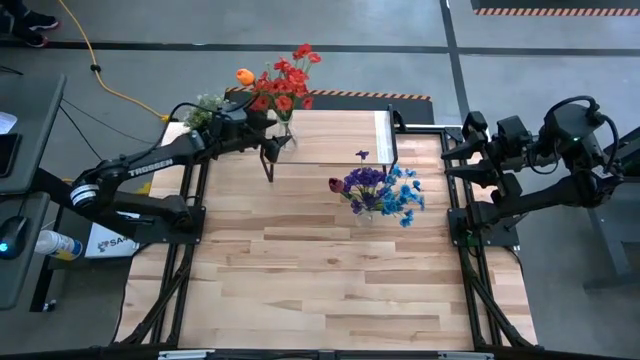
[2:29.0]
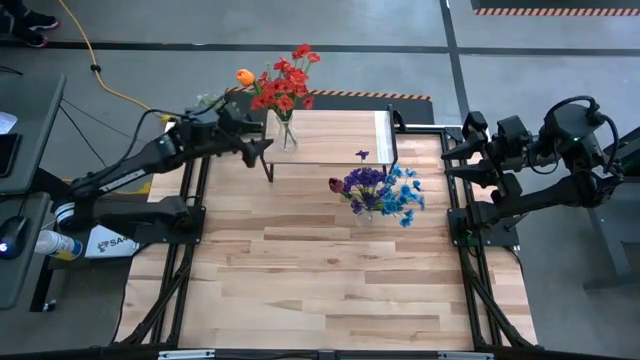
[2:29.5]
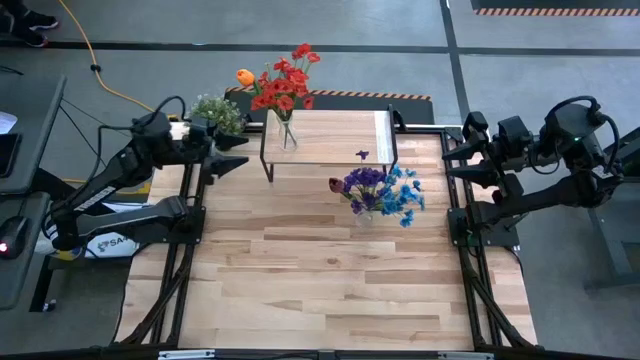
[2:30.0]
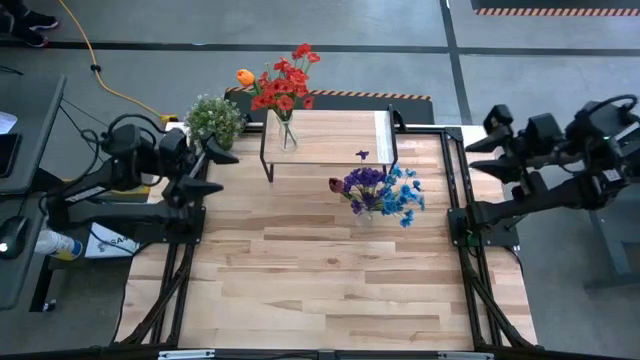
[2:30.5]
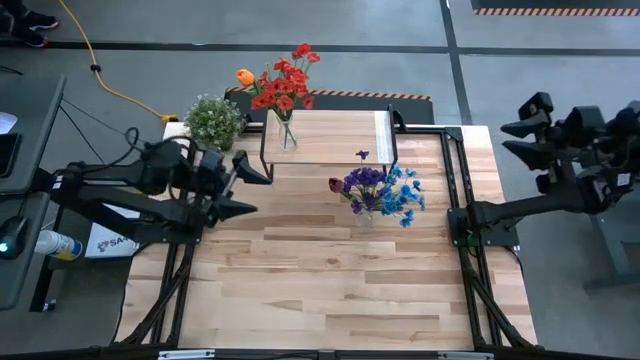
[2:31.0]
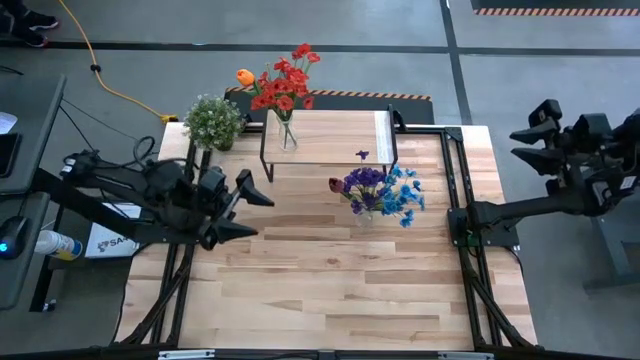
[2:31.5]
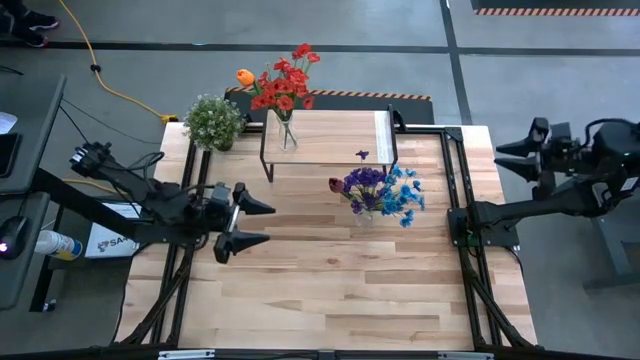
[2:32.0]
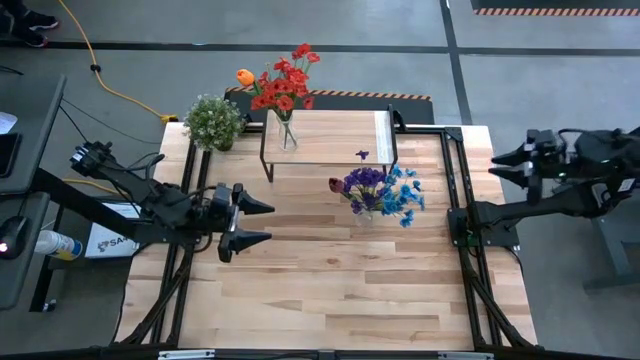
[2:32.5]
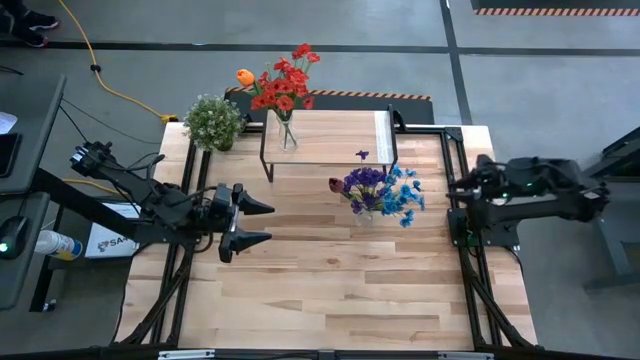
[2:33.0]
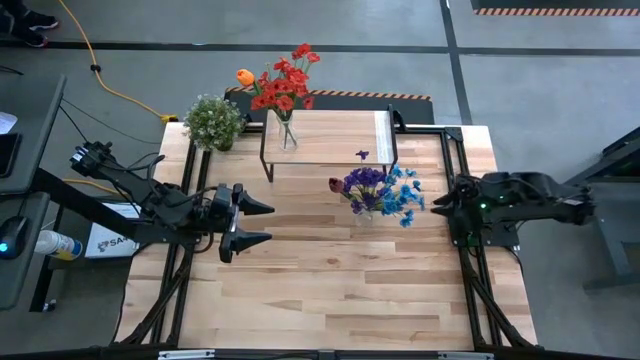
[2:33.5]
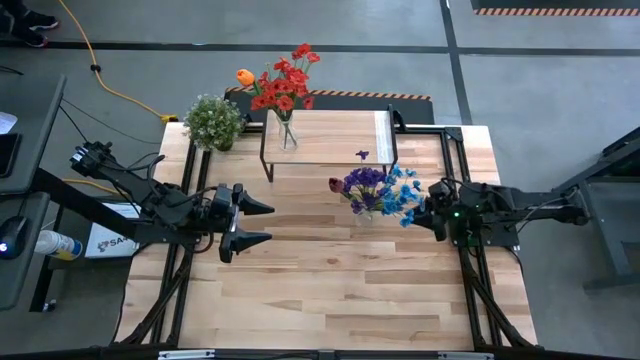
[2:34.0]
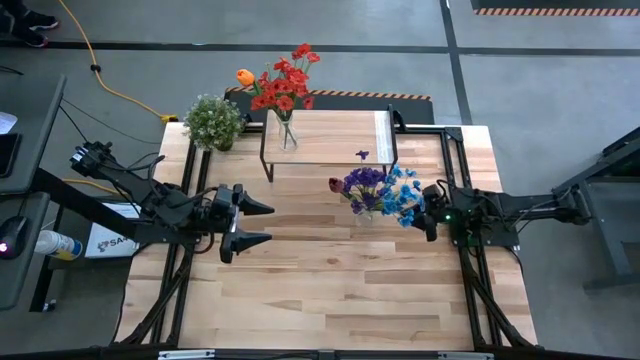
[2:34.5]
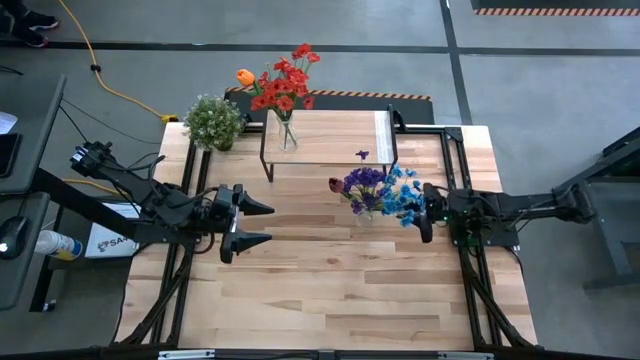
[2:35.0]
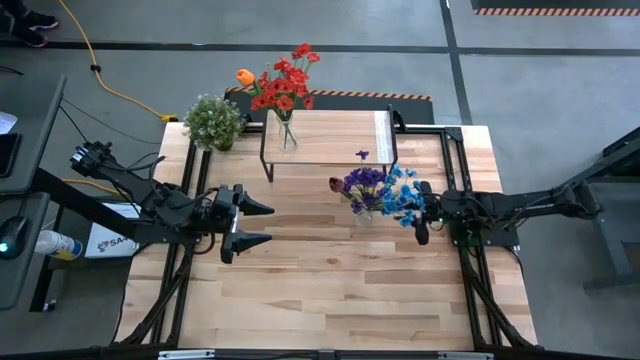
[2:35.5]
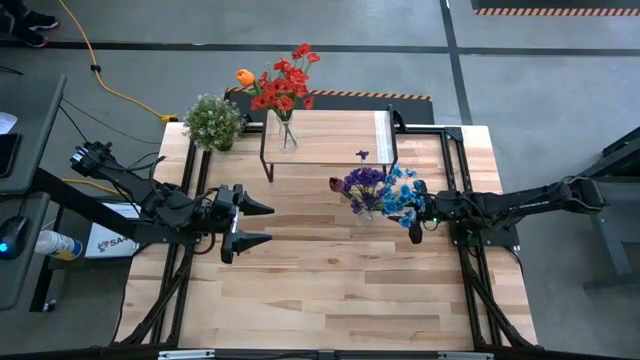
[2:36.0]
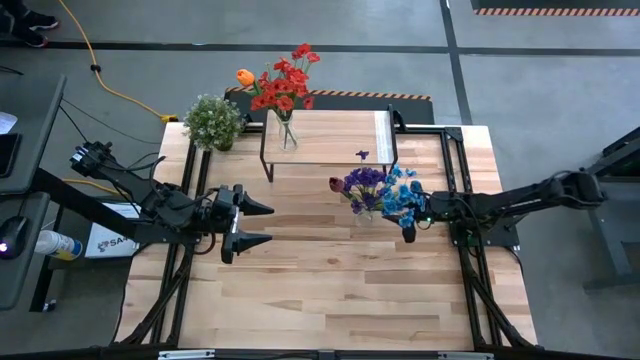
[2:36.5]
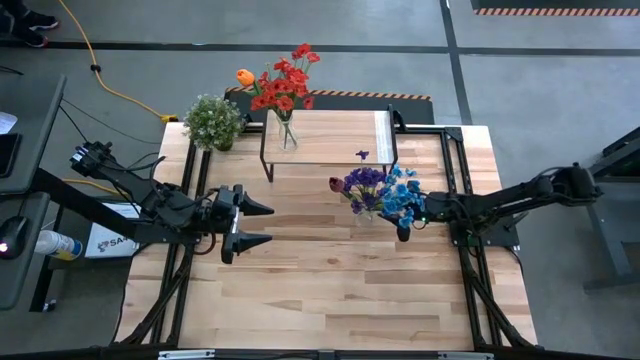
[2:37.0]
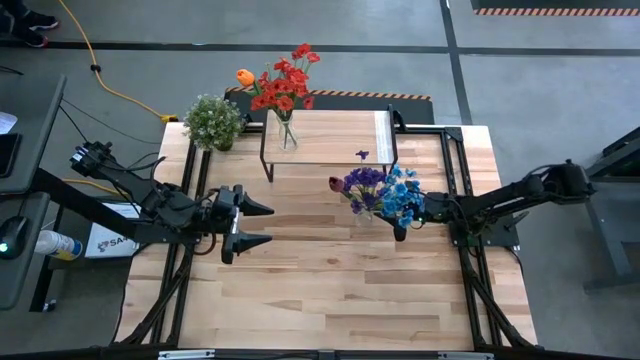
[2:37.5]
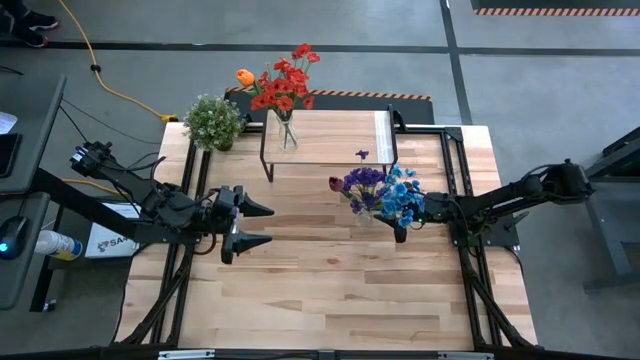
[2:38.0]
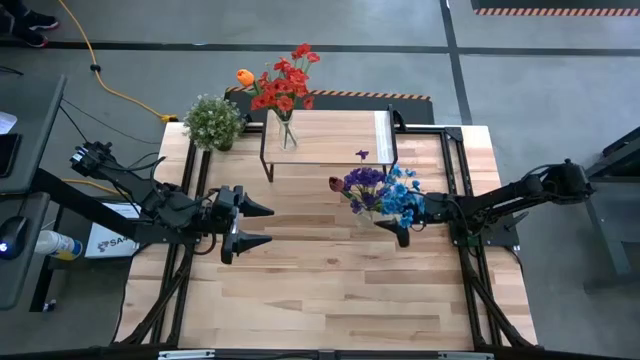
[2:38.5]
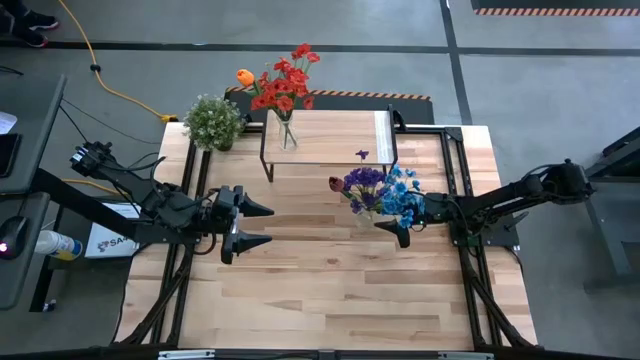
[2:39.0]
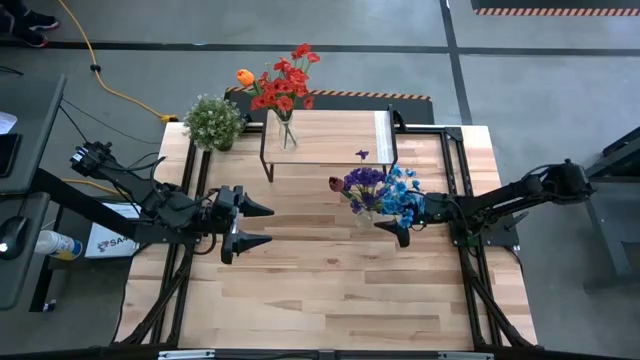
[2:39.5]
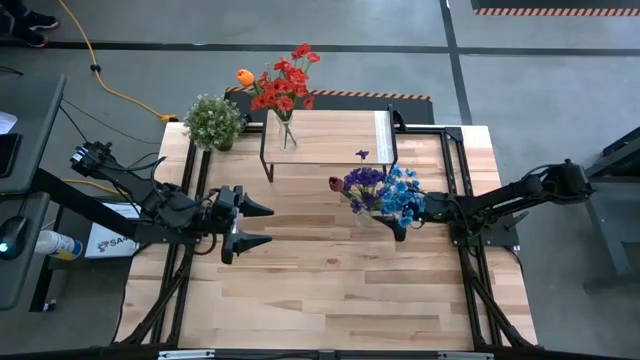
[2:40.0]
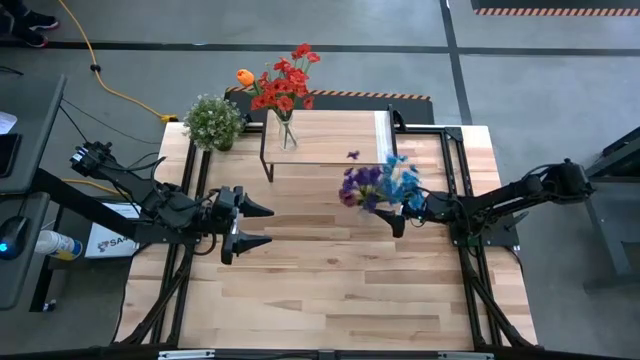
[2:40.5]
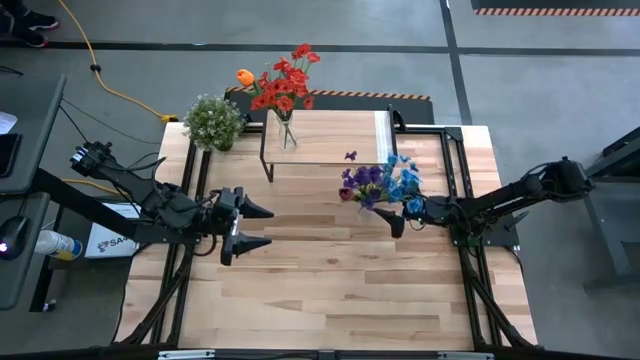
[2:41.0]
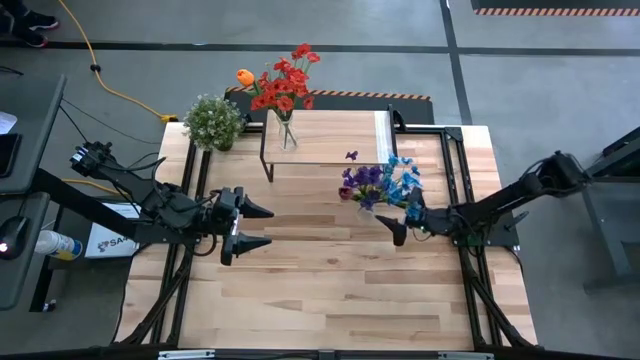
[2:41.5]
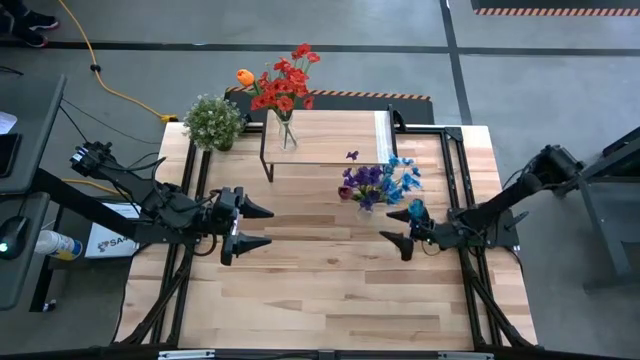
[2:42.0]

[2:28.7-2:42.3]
Task: Pick and place flowers into a vace then onto a shelf
Put the transparent vase with flowers on the shelf

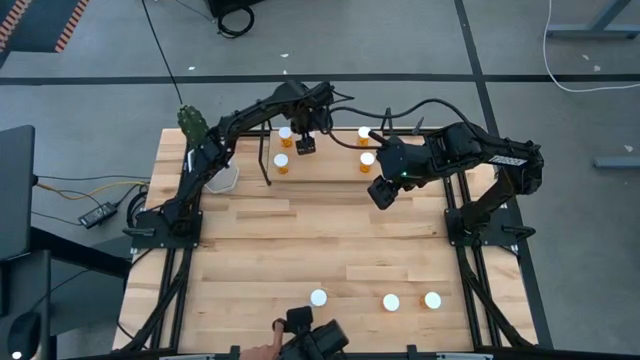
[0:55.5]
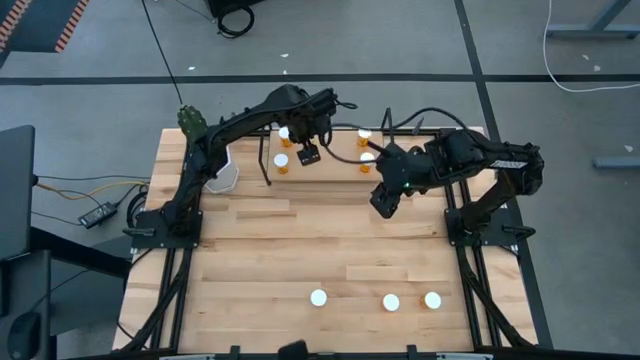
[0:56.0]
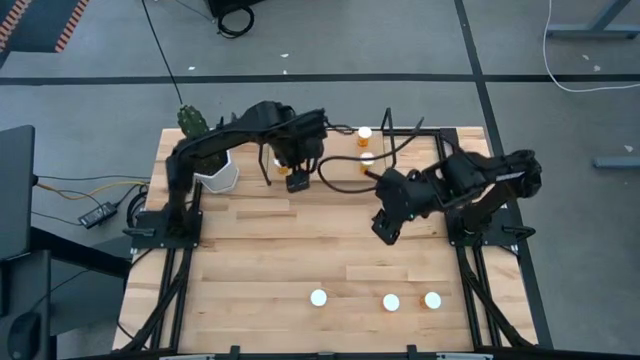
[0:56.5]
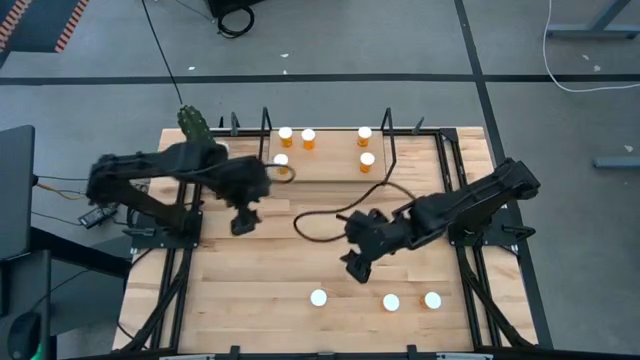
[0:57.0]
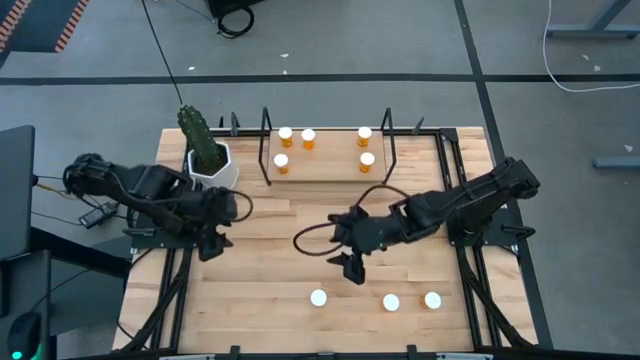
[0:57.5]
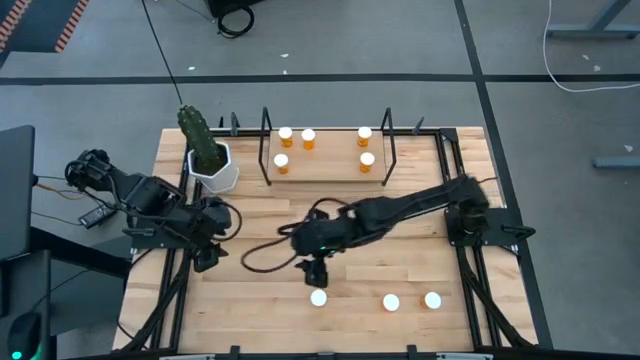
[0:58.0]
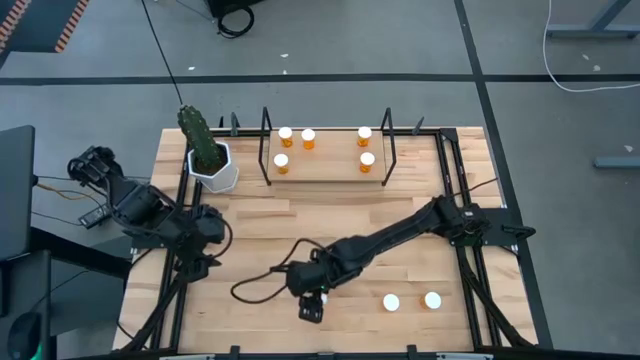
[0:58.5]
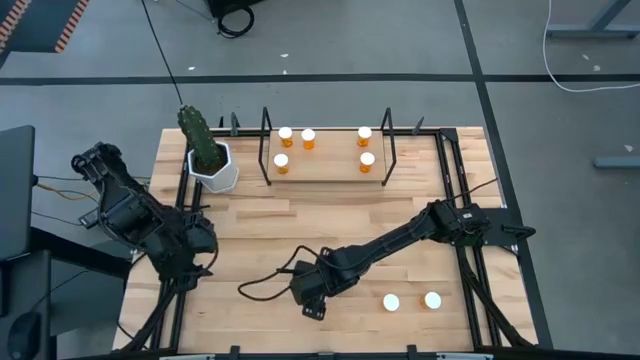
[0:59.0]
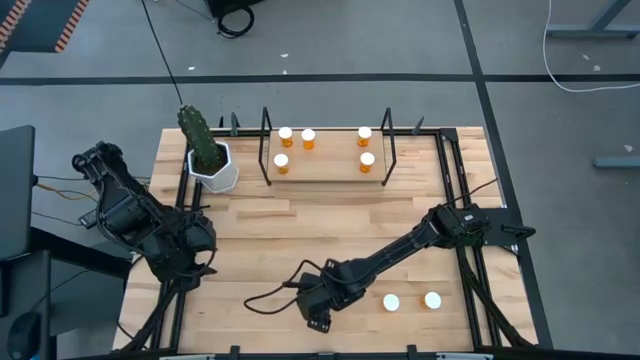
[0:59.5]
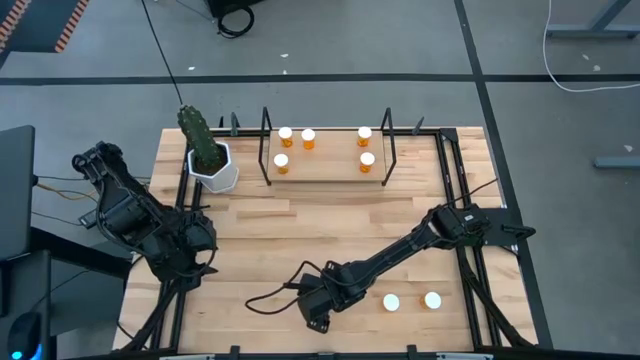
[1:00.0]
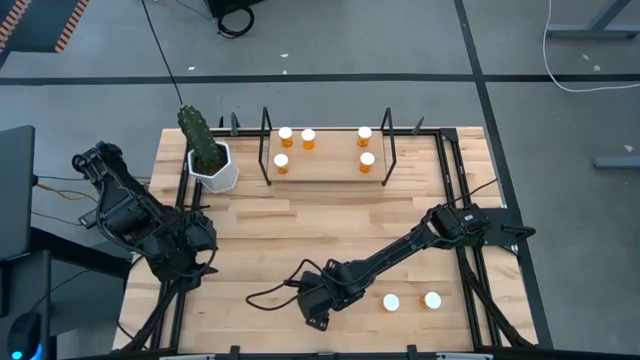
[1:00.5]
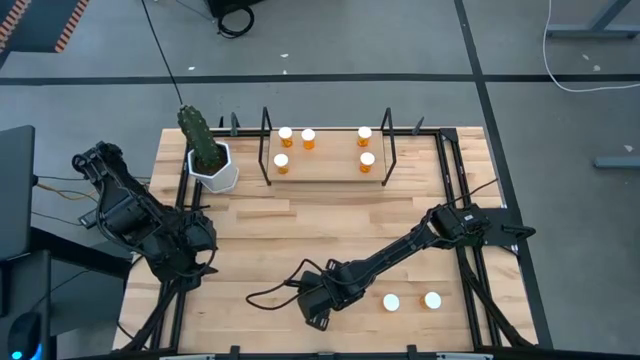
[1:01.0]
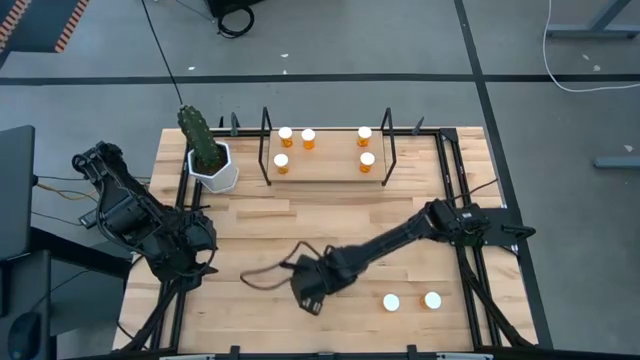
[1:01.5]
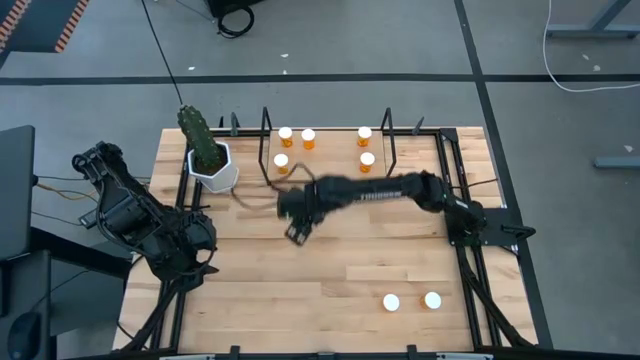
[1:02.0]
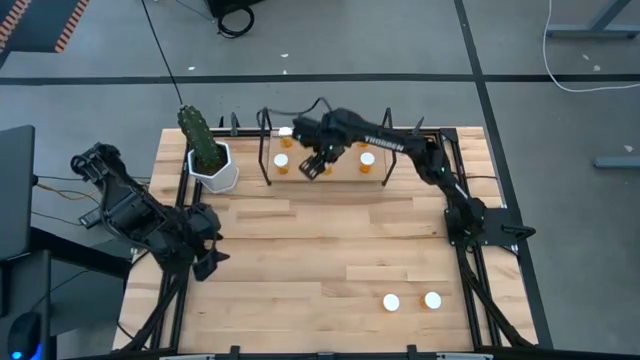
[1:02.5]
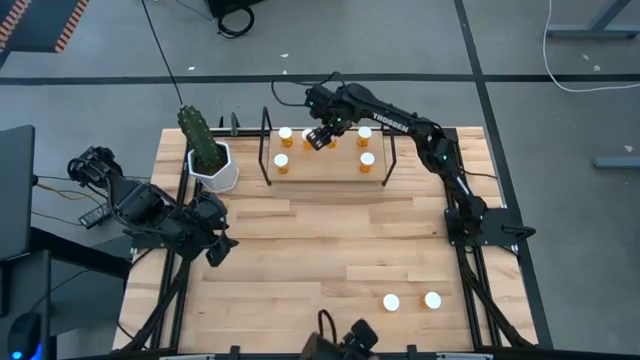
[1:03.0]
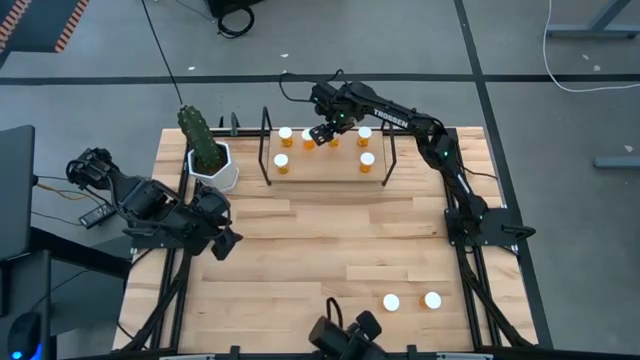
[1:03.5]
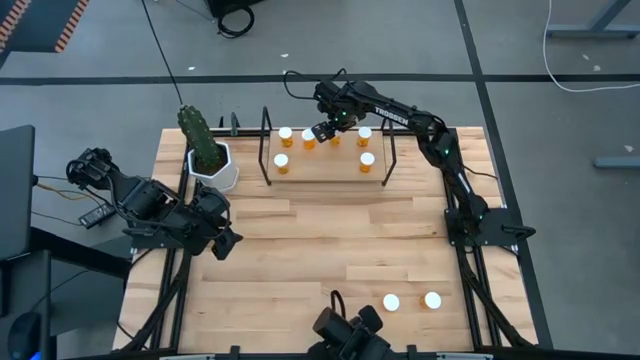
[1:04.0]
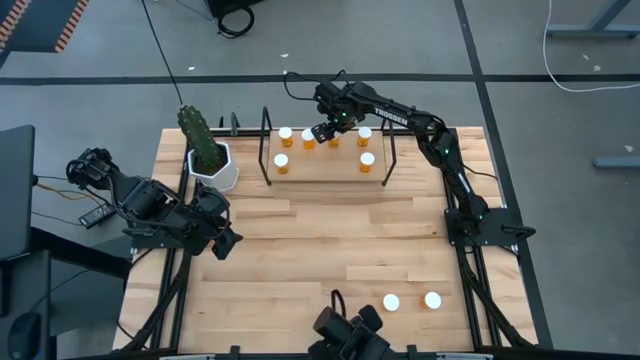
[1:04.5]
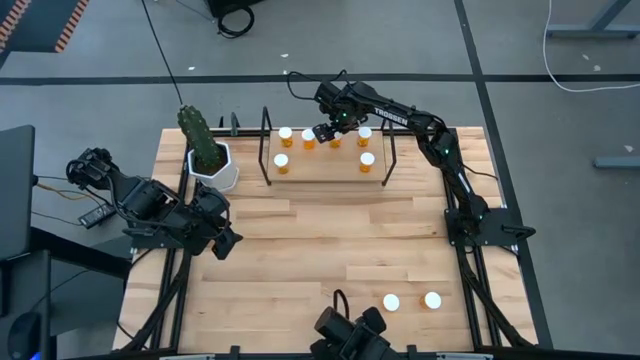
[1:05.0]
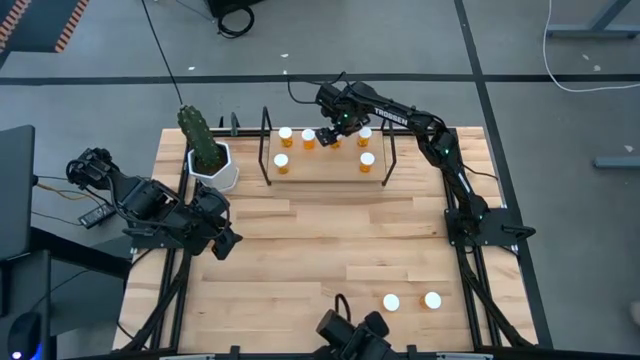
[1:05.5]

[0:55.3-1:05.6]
Task: Pick and place medicine bottles onto shelf by color
Put the orange pill bottle on the shelf
